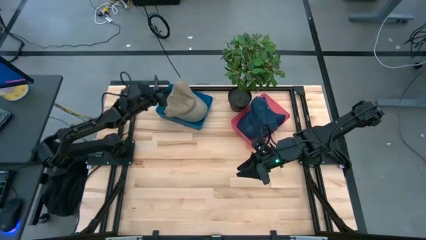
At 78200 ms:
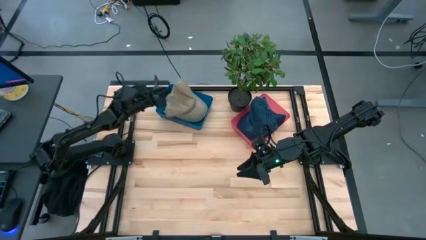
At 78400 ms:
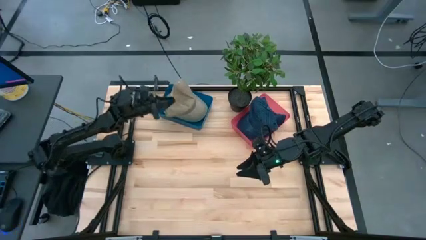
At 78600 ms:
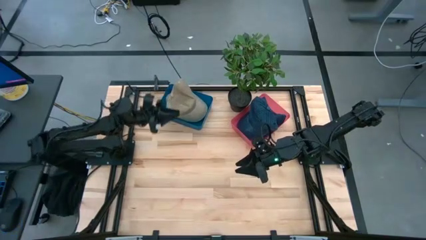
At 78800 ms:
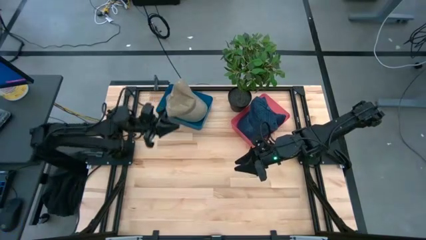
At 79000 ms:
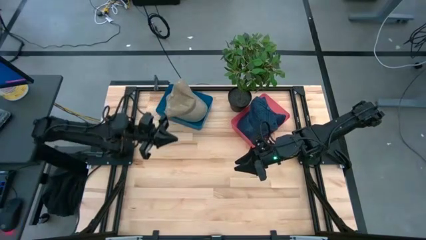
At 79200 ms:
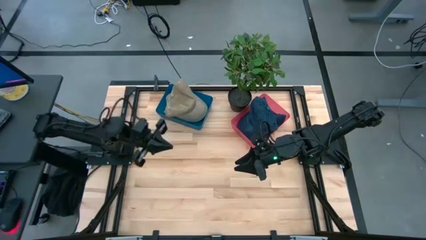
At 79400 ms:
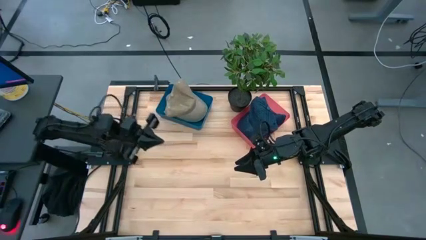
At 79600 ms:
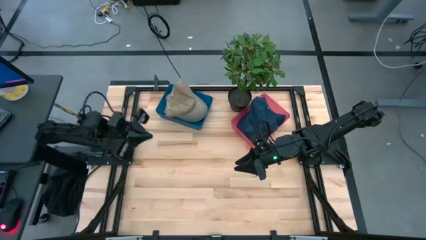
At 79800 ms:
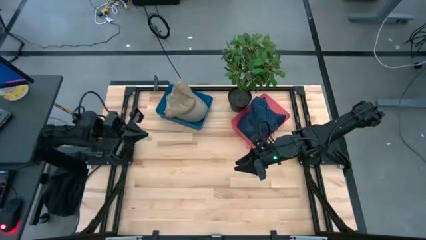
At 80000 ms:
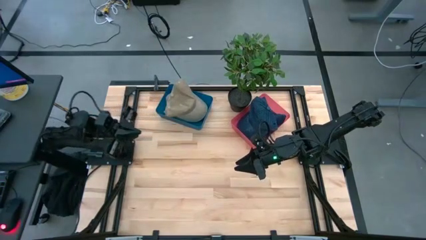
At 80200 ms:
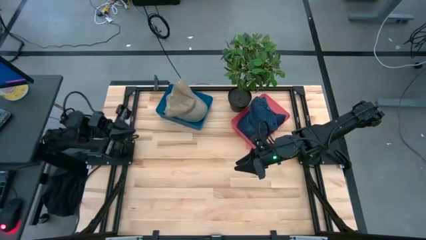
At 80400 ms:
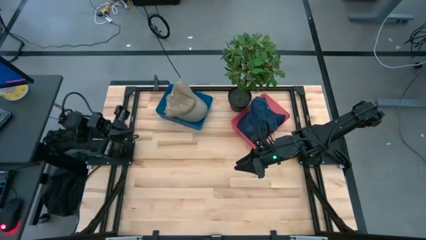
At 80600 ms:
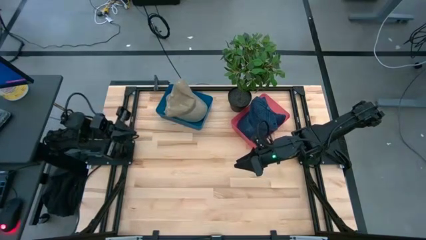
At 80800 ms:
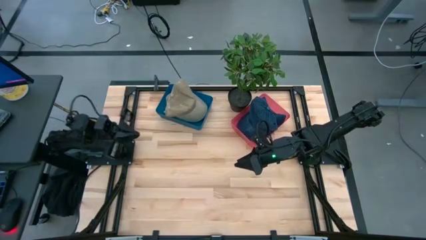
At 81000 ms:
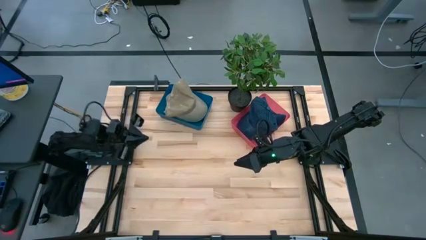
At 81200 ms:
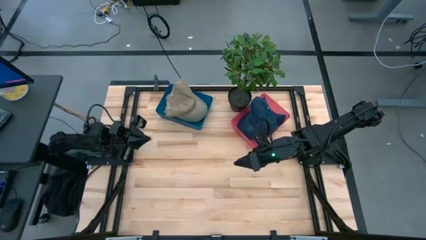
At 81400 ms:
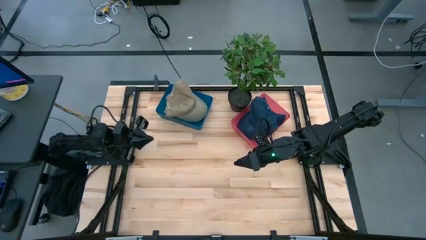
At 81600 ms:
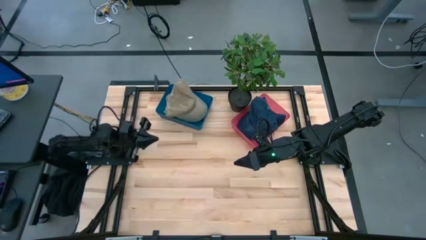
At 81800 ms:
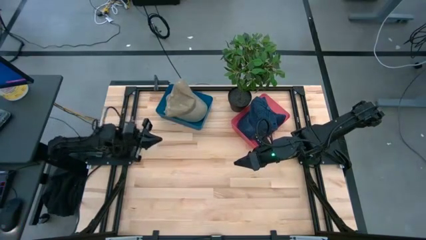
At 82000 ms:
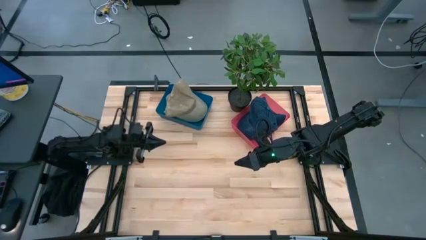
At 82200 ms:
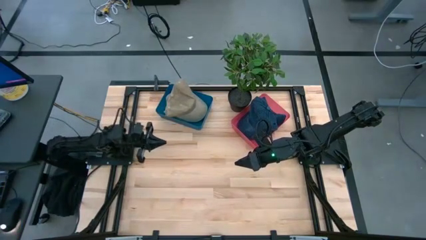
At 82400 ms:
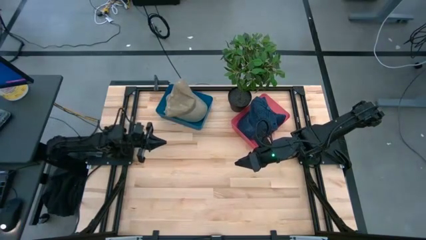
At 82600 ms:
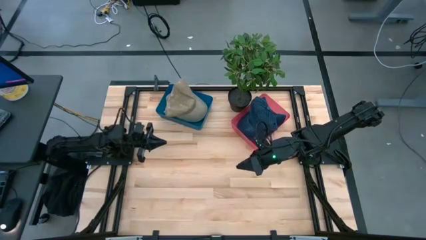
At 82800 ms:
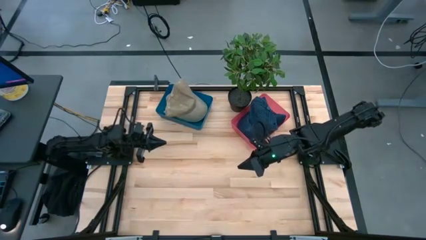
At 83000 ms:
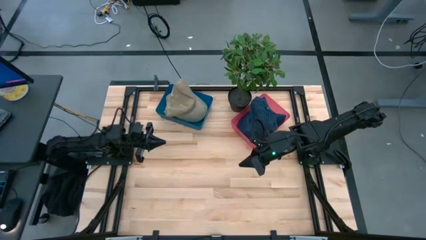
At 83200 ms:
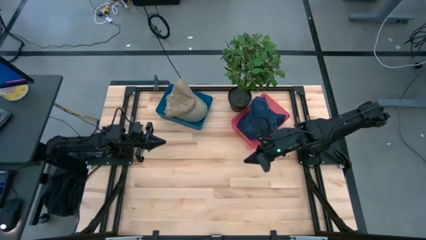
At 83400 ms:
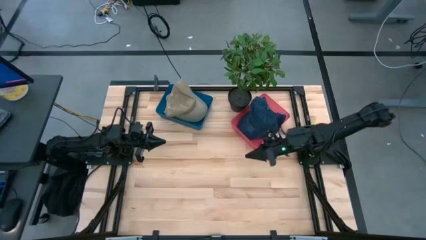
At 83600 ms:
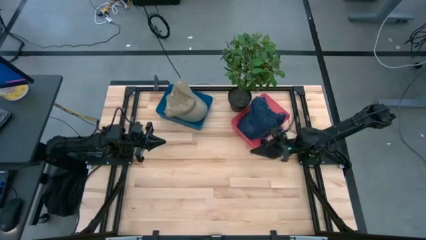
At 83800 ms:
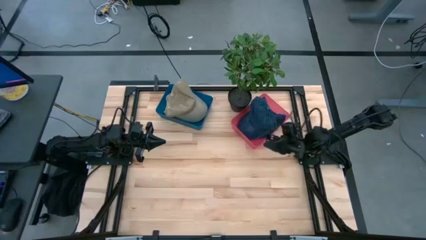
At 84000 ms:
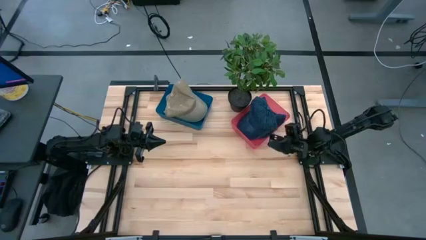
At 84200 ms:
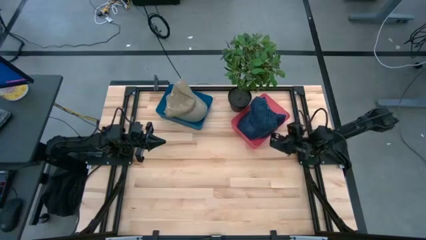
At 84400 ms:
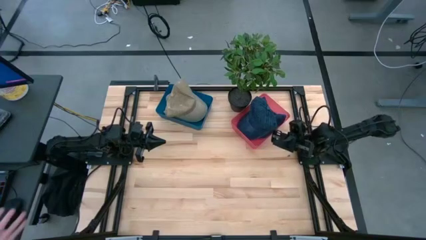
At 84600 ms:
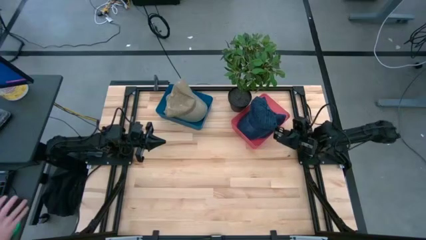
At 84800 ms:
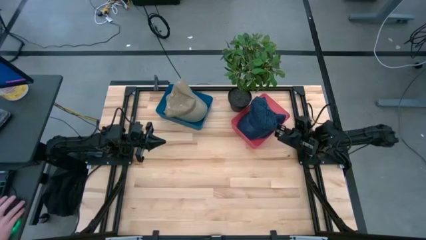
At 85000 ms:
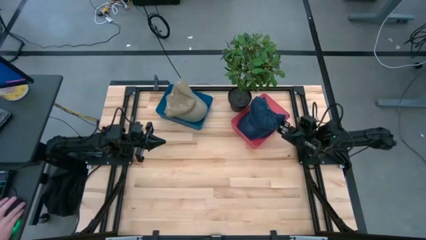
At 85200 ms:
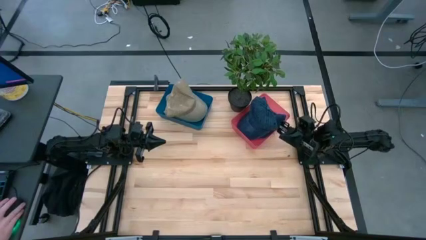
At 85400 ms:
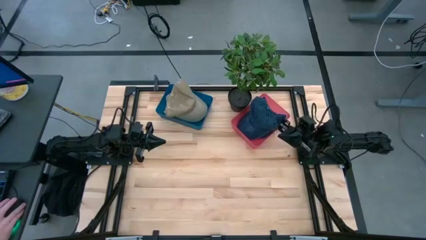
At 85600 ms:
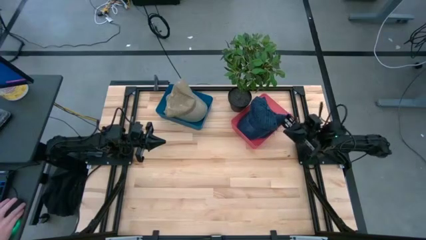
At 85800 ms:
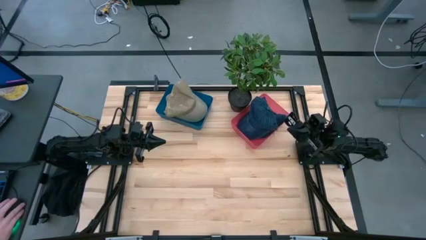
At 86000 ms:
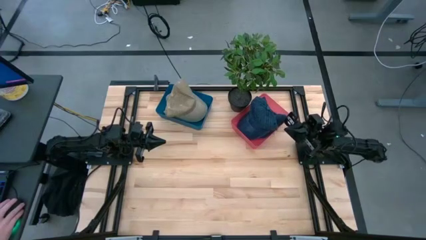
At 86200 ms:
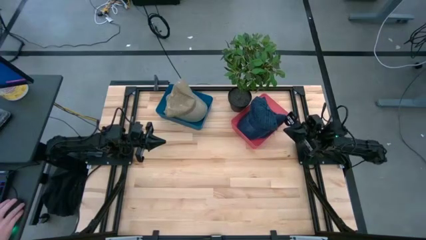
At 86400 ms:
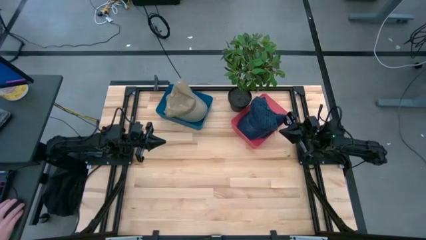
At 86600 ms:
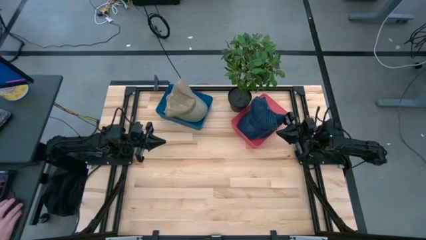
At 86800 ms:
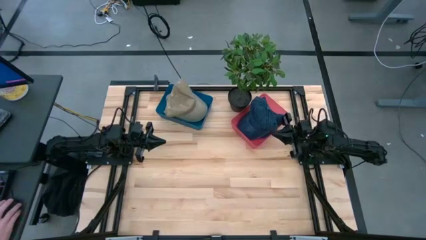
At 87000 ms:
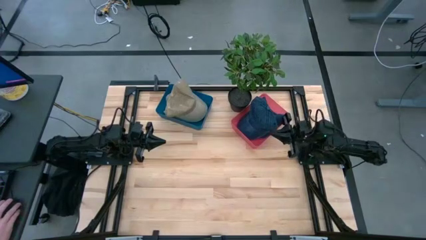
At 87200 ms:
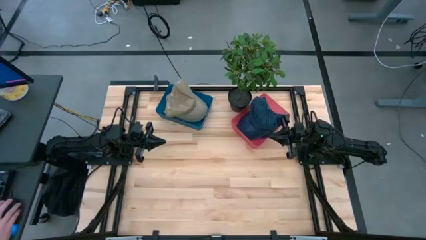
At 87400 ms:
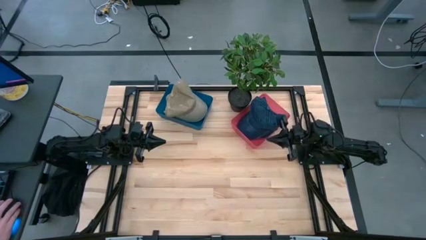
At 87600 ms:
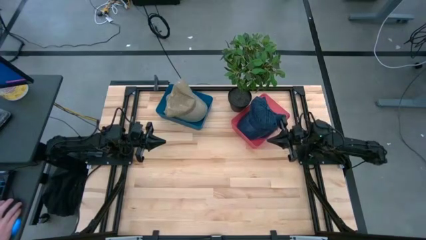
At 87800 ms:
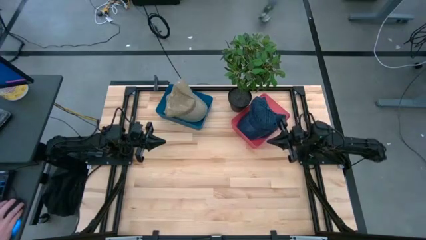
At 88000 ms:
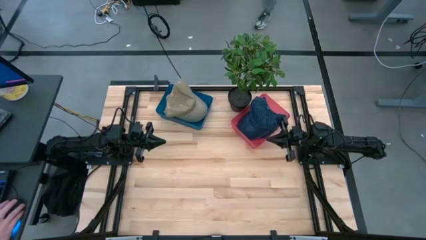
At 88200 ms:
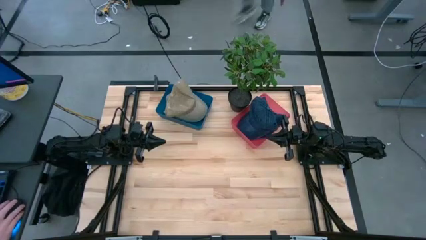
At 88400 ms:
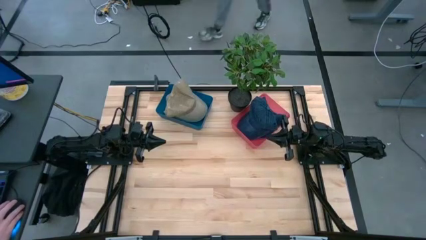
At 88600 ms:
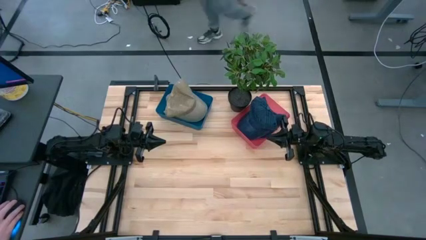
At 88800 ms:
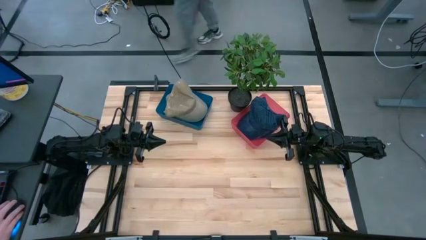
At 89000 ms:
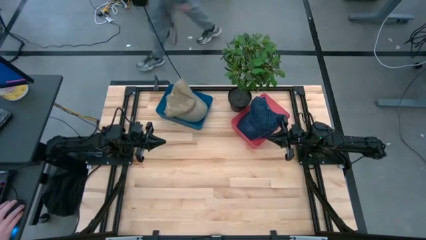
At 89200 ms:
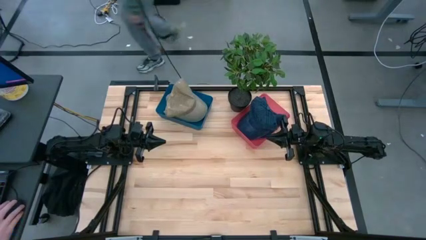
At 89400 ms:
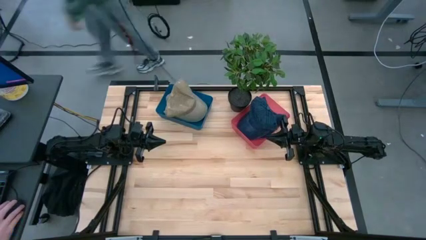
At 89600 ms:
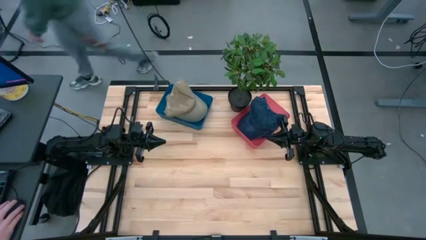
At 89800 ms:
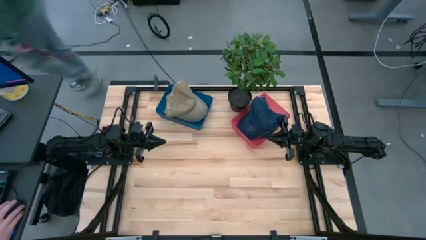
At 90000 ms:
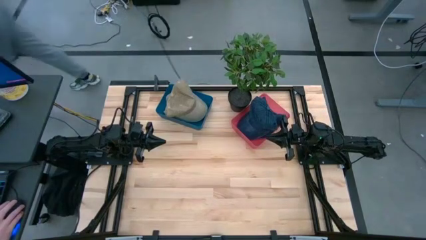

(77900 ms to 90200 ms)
Task: Pick & Place hat
Return to Home Position

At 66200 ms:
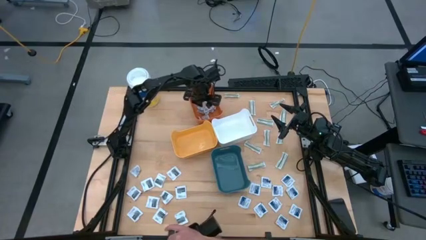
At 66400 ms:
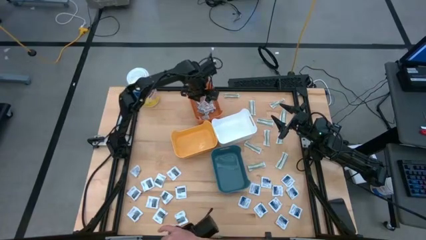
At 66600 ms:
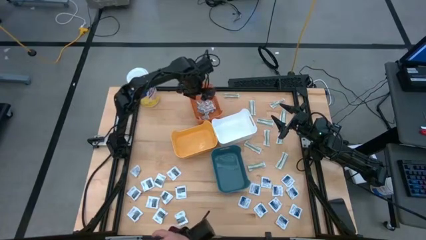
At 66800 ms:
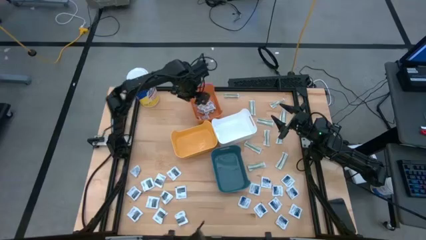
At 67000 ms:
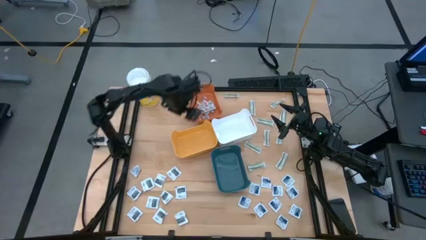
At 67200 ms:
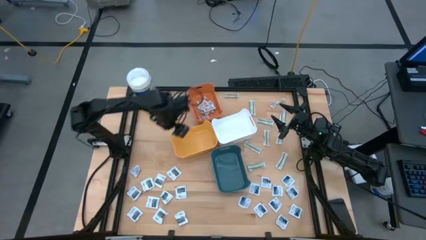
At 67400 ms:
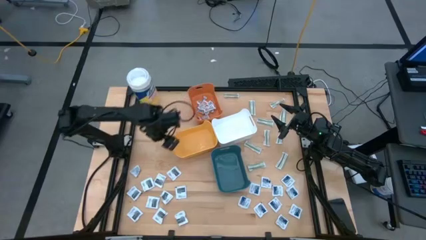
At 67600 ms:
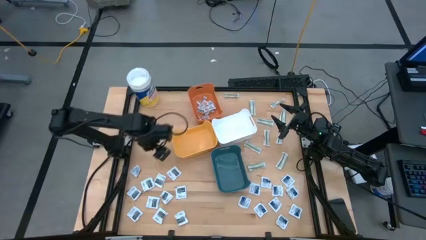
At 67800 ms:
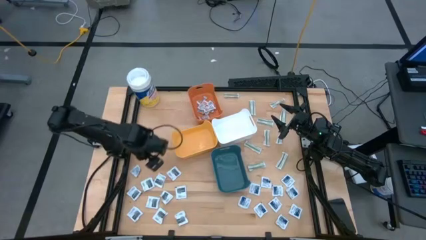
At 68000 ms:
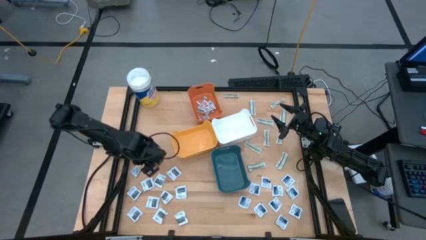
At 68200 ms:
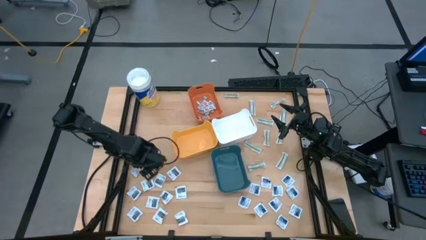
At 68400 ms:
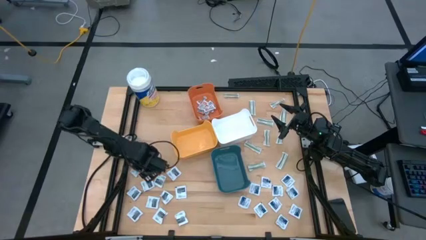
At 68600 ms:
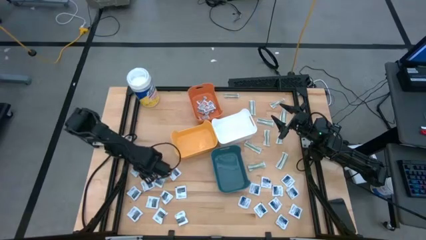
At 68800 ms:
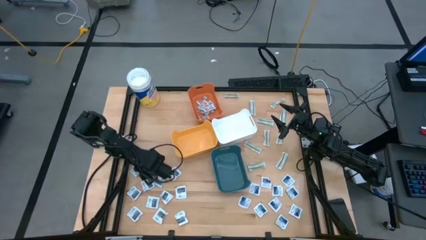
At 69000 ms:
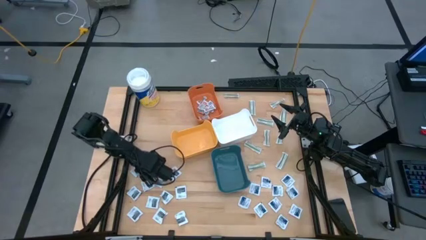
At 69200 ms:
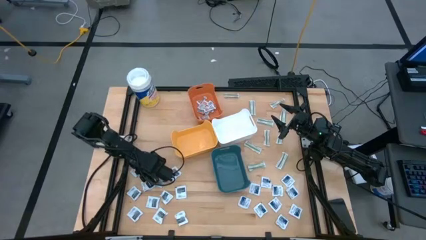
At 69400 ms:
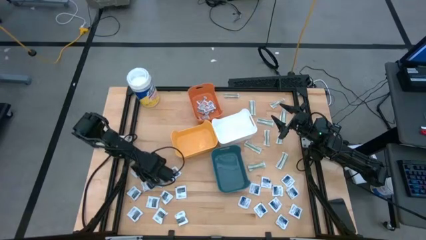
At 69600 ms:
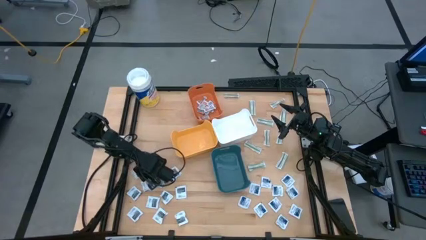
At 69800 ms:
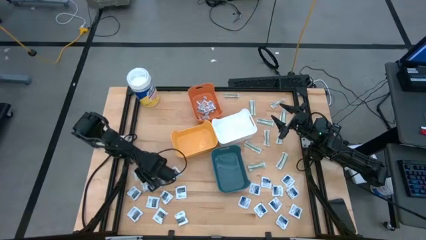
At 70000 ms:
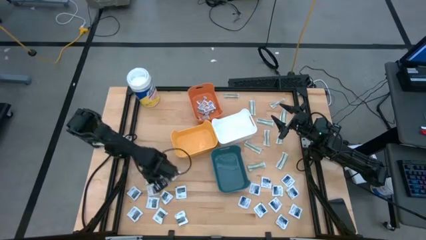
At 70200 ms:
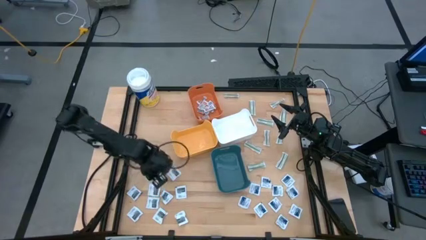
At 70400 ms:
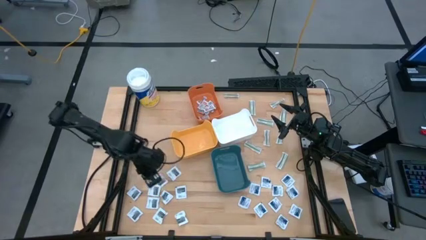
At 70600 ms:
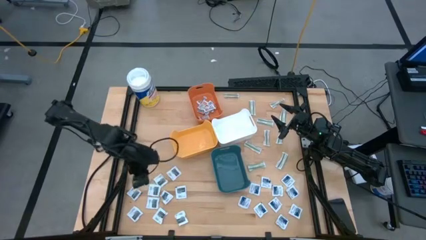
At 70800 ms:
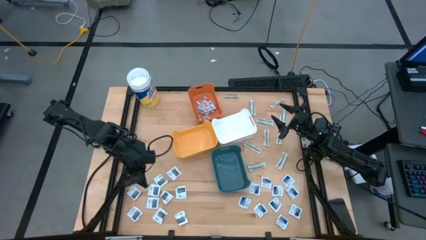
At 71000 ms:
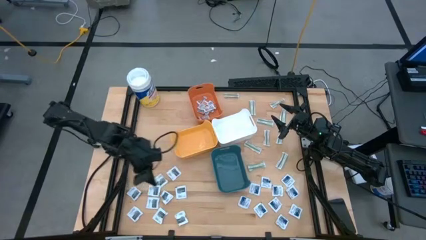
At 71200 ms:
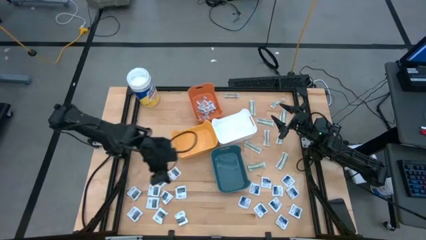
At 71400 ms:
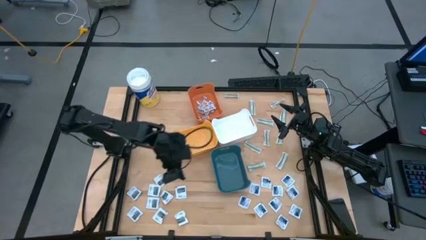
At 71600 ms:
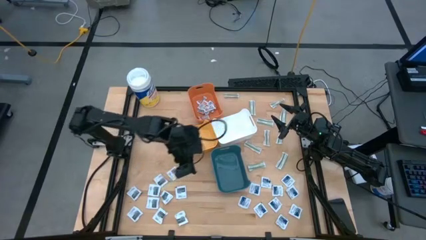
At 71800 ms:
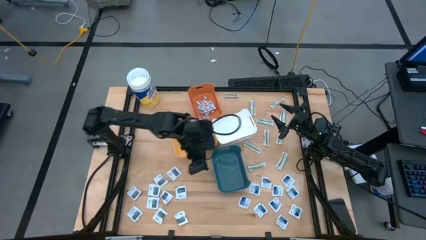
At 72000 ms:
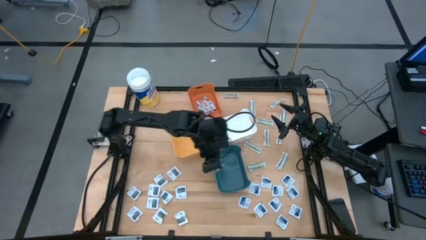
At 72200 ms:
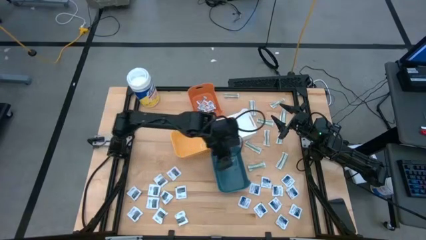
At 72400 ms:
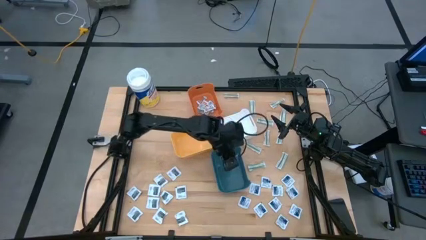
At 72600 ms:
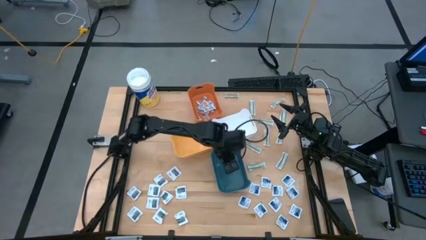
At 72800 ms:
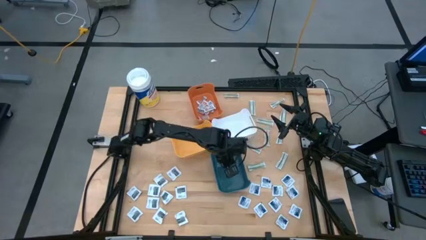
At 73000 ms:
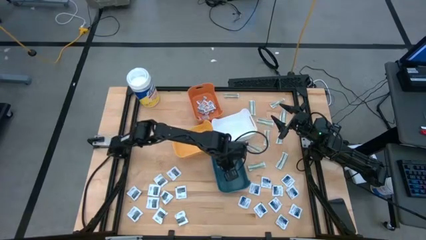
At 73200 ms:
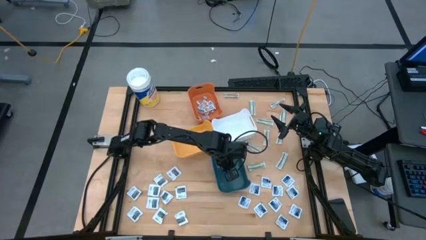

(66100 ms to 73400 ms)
Task: Pick & Place First Aid Supplies
Put the black towelette pack into the blue bin
